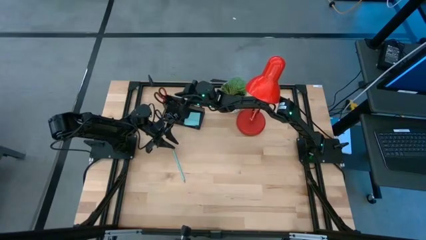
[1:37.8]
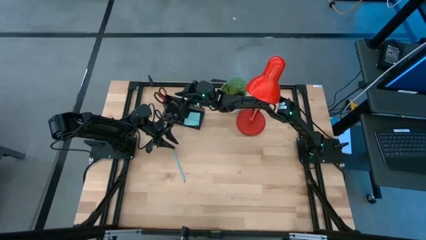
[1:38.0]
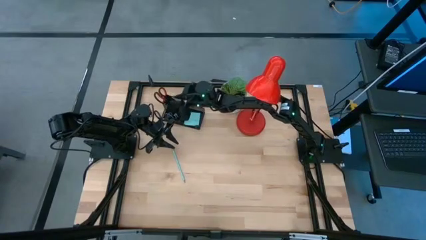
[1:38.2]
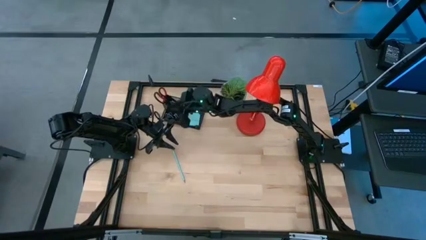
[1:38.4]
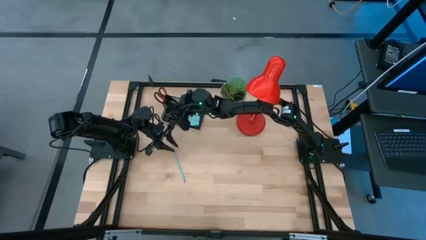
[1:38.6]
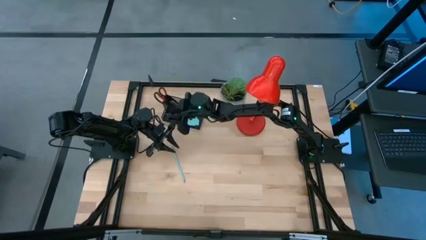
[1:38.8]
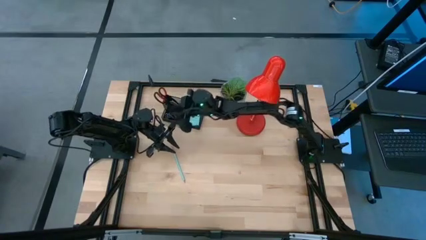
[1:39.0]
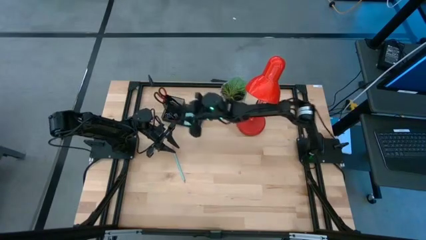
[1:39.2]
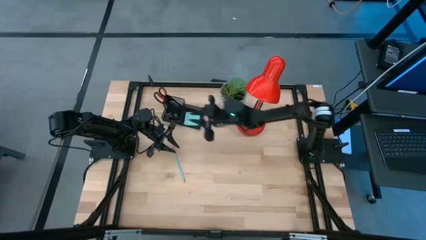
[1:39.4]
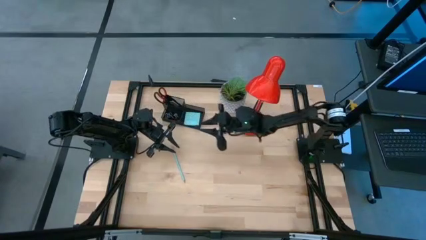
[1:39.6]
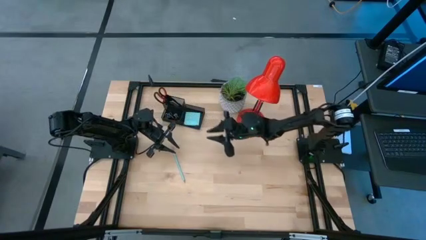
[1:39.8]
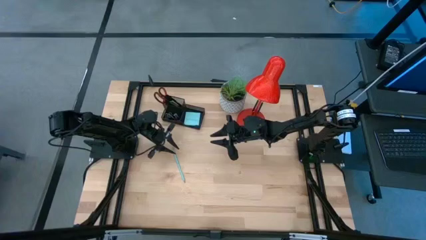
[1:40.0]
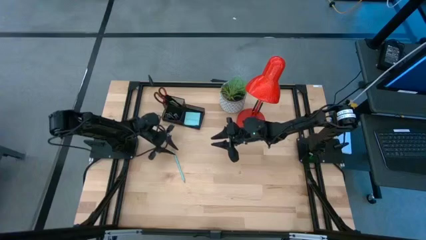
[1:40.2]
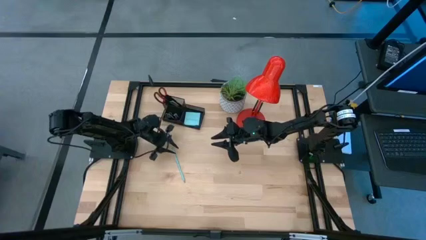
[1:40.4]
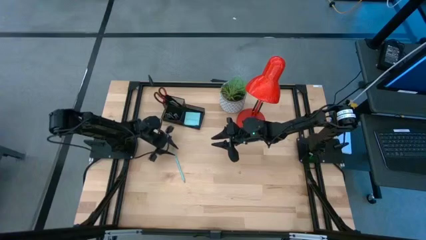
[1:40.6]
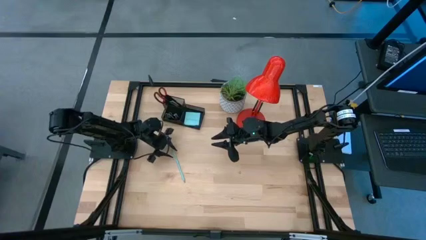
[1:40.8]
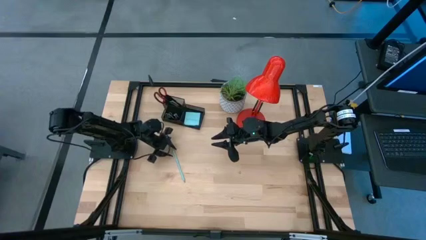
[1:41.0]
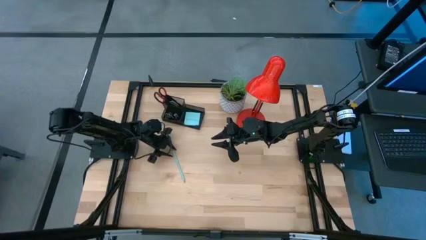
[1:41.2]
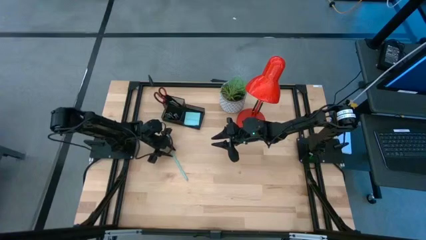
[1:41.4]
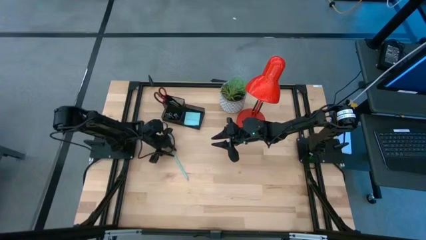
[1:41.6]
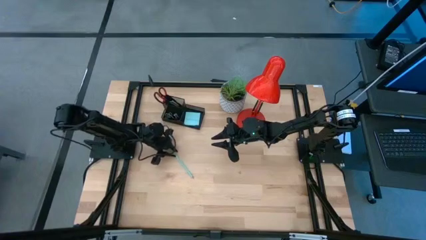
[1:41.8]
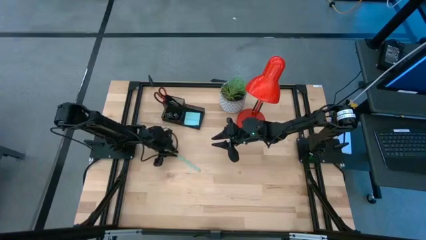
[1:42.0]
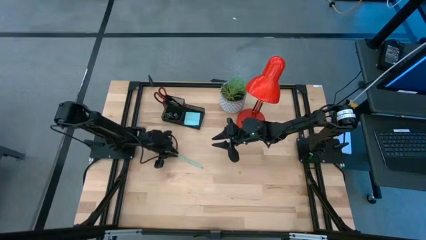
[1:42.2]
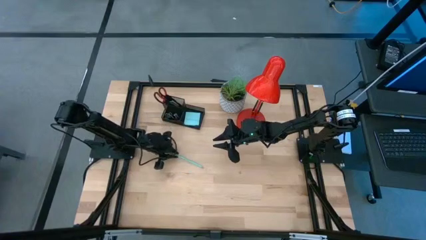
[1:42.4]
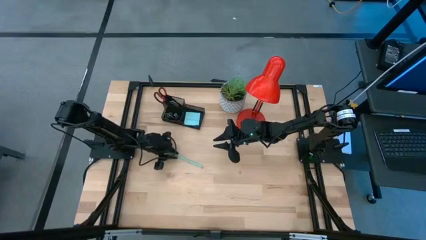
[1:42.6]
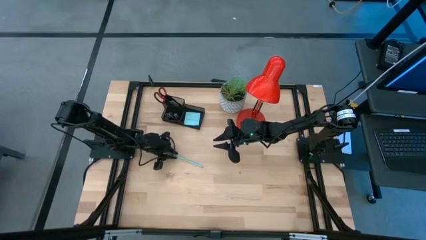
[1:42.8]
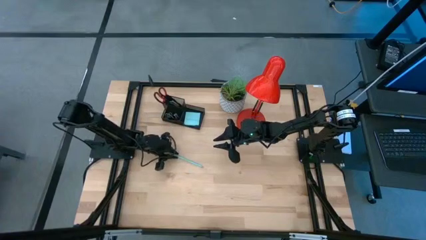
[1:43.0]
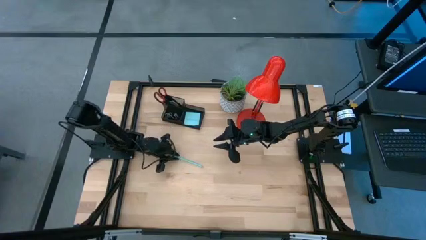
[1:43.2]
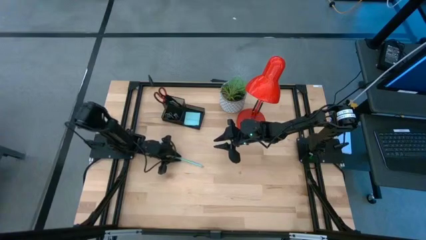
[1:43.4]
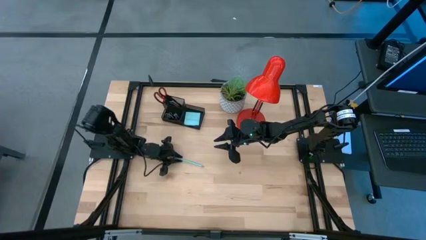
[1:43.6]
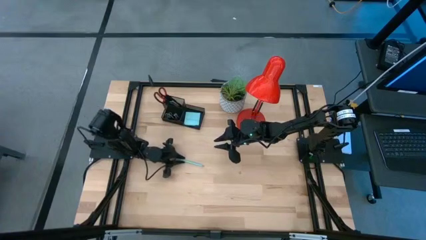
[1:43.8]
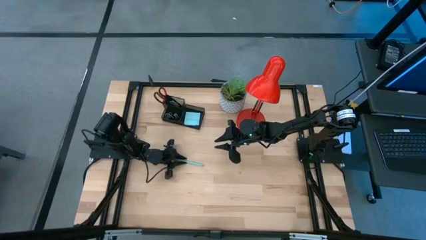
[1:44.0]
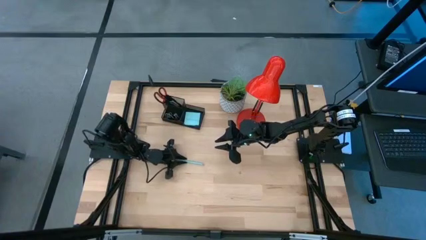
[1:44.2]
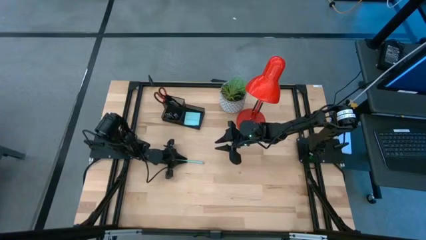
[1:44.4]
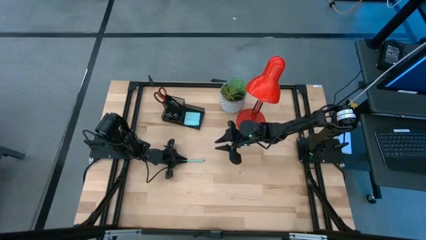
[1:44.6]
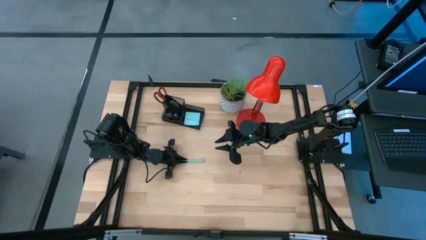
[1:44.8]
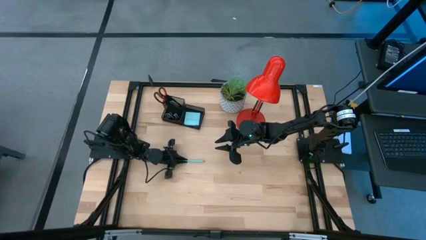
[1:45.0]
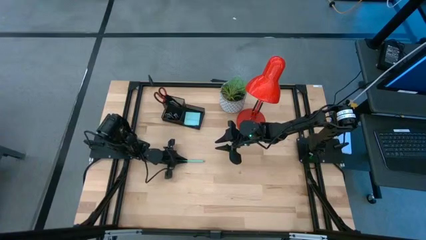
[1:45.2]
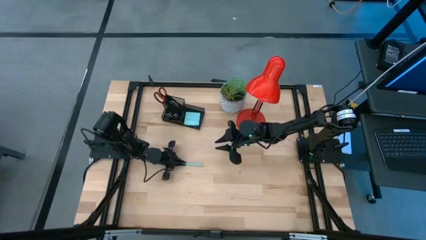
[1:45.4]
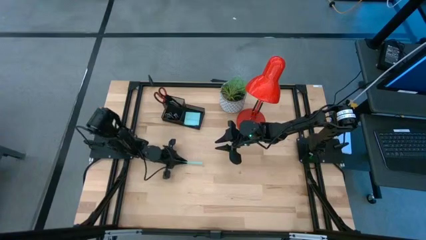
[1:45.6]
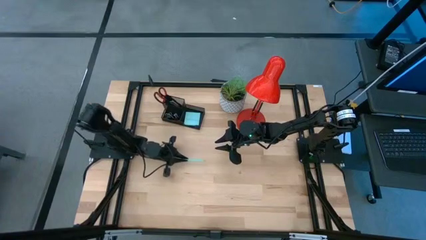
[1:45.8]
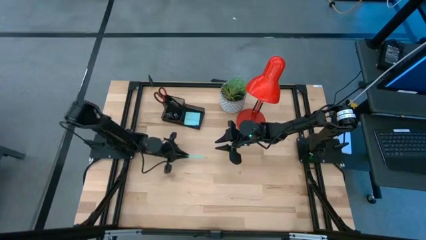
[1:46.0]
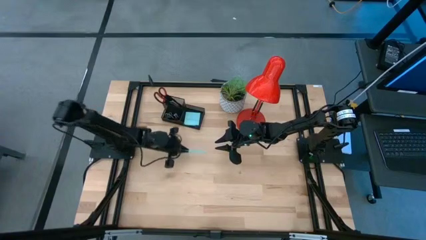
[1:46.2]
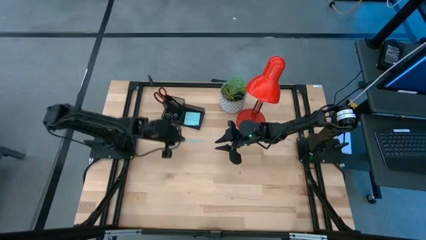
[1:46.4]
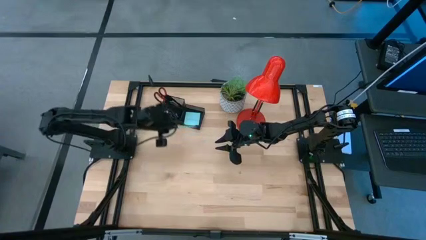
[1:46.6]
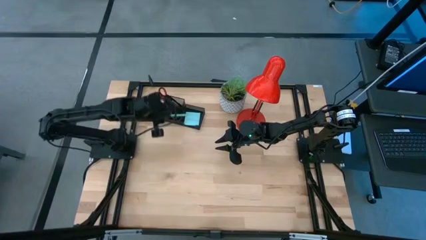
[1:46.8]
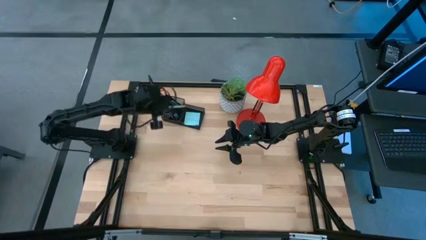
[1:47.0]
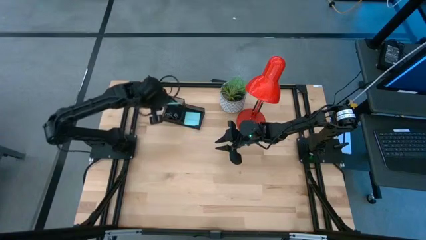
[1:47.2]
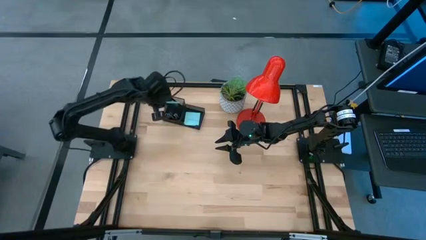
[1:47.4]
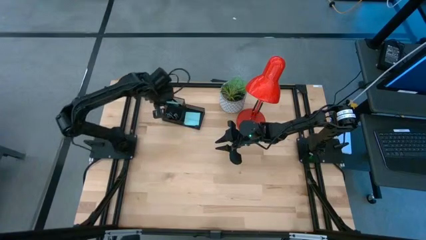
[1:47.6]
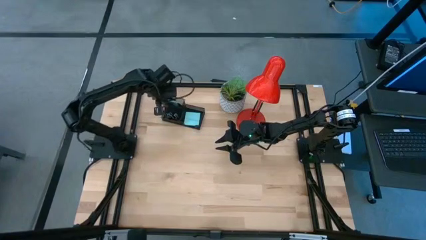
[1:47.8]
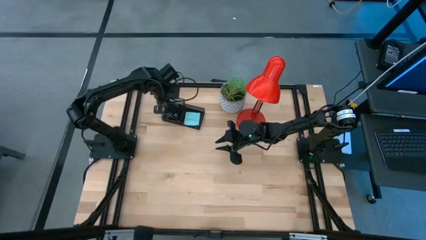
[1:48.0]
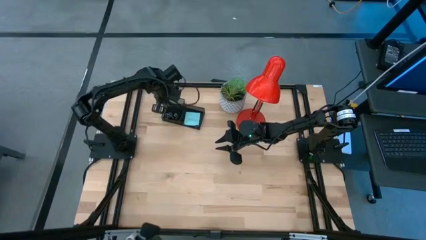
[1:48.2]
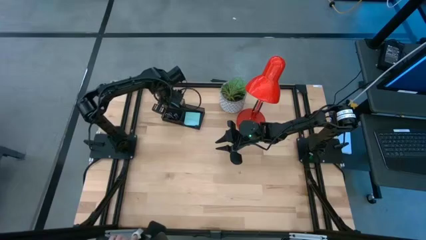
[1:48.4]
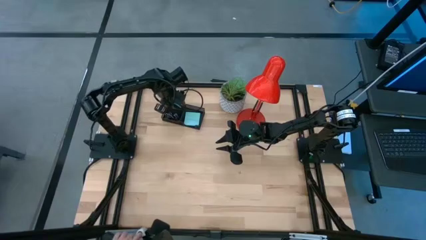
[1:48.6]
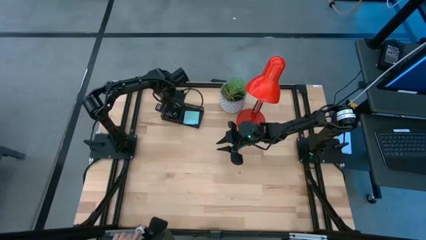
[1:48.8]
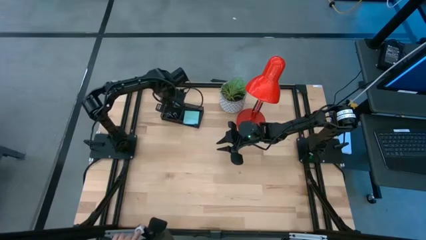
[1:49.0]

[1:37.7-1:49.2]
Task: Pick and place office supplies into organizer
Put the blue pencil into the black desk organizer

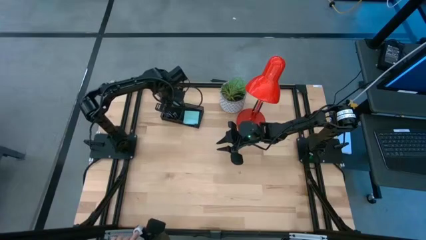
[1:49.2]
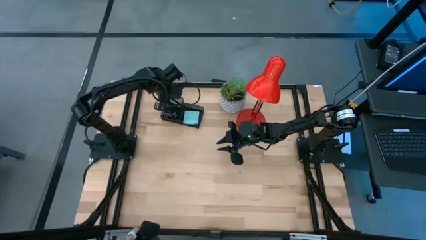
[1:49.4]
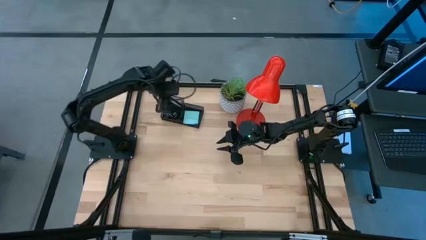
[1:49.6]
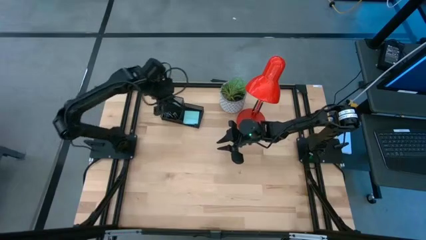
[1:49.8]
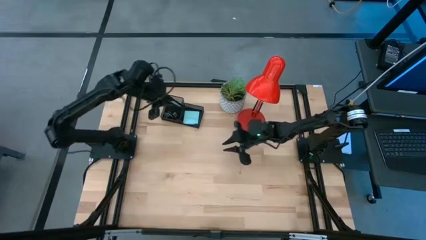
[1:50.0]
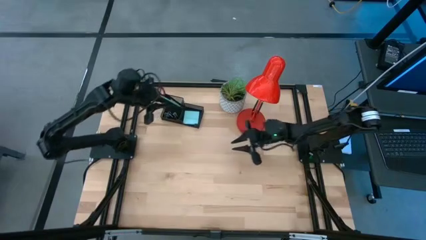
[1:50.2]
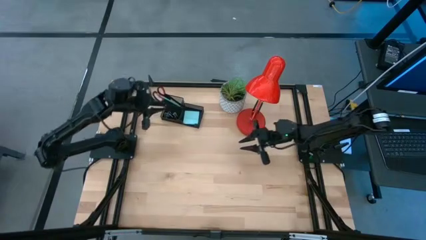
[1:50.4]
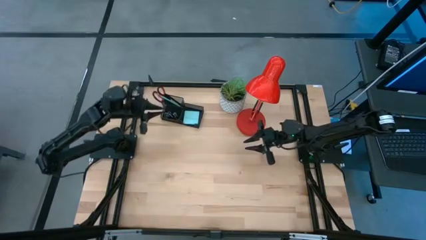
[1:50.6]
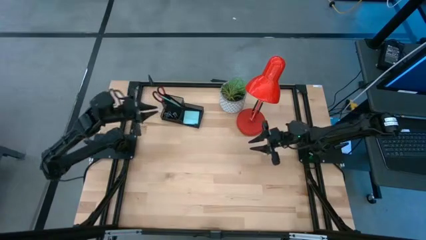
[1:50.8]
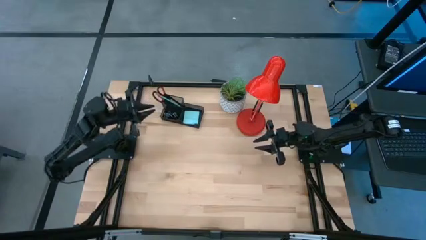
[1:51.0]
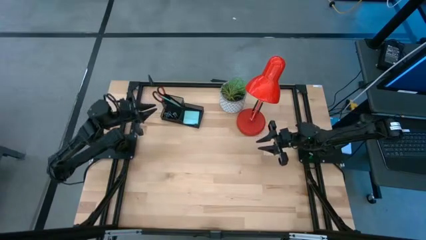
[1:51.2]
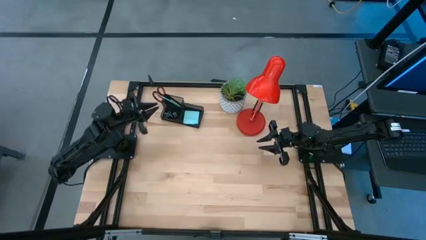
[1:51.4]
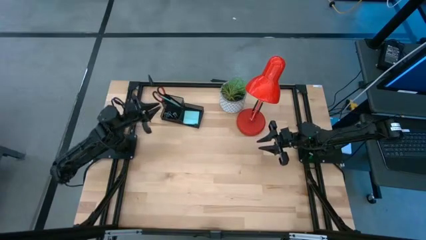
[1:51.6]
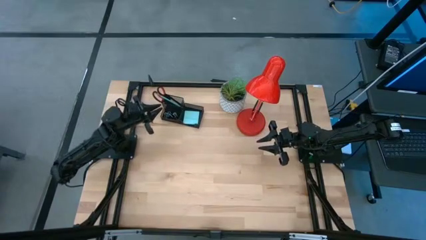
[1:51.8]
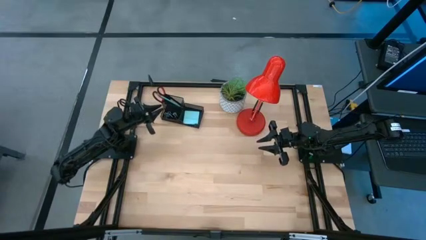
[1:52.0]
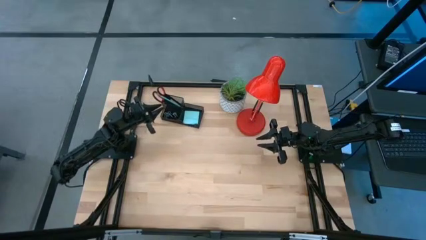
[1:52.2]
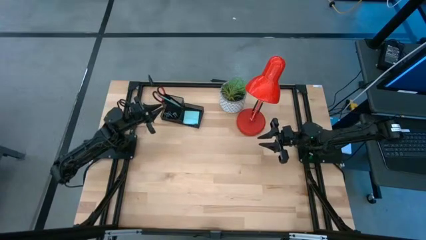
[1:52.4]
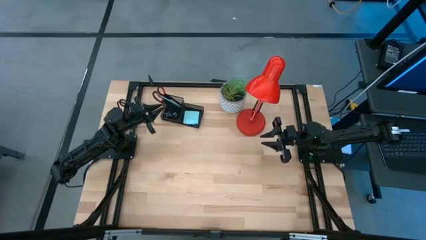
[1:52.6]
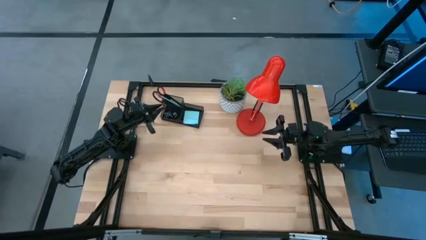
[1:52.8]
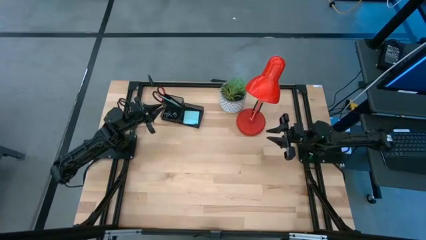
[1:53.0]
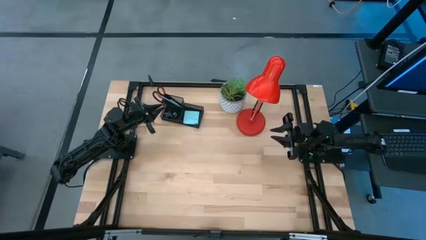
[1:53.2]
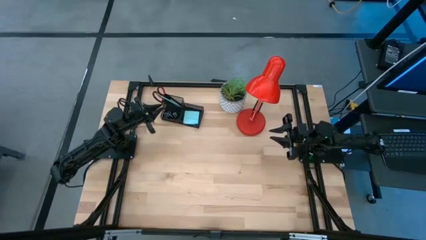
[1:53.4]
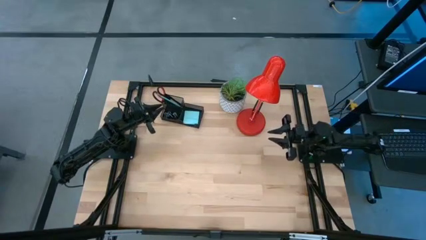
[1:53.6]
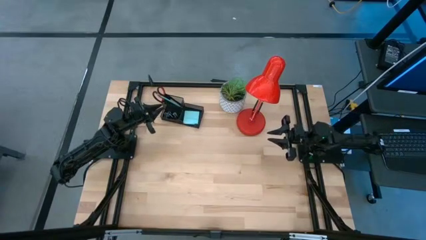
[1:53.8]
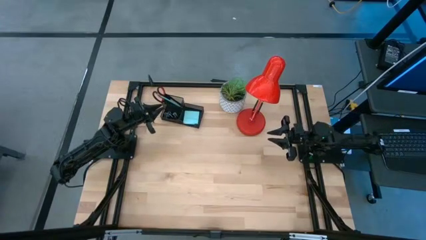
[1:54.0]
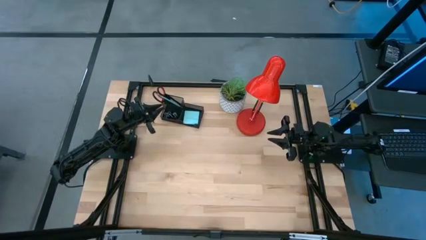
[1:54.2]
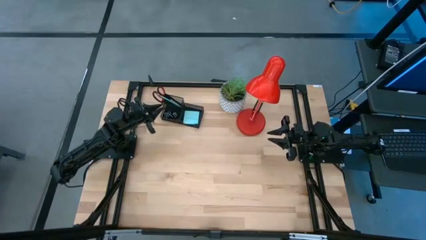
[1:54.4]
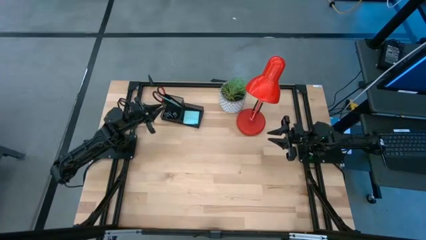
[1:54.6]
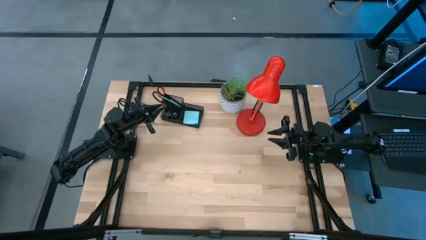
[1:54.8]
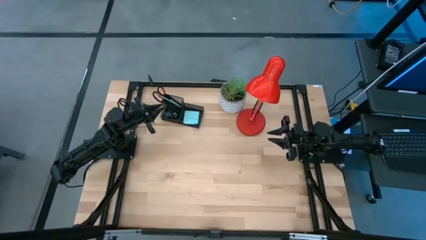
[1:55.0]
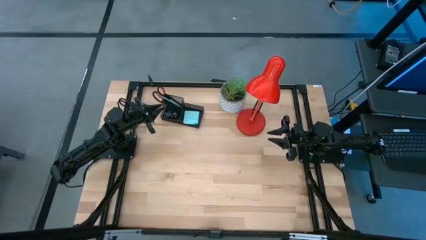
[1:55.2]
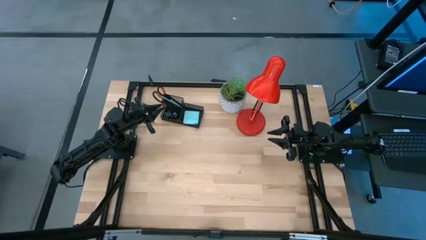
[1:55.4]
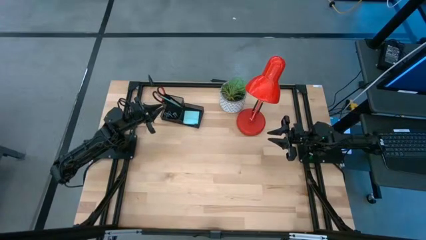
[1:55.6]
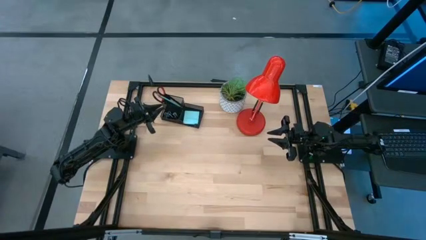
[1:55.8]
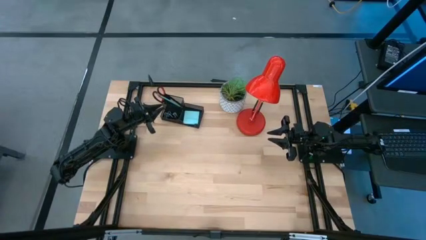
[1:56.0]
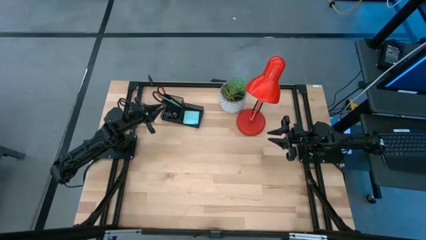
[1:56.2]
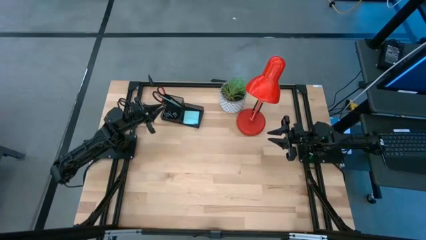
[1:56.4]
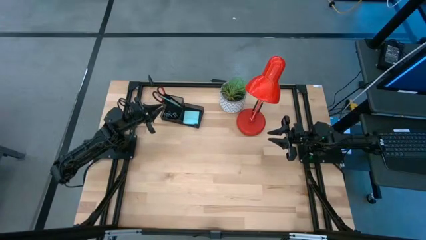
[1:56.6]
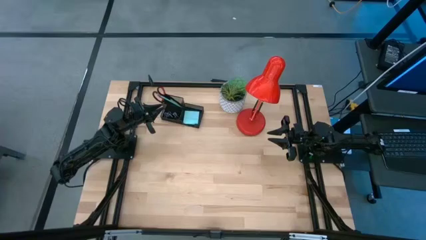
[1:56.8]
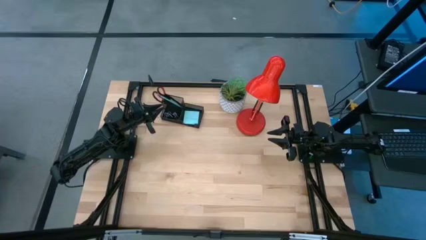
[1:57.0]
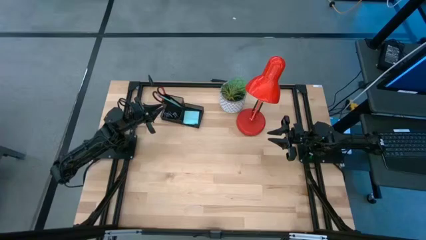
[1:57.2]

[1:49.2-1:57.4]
Return to Home Position
